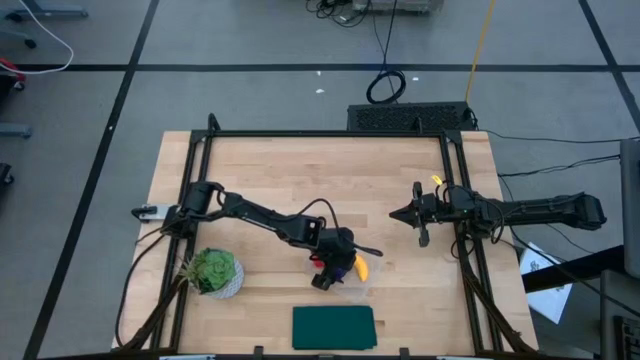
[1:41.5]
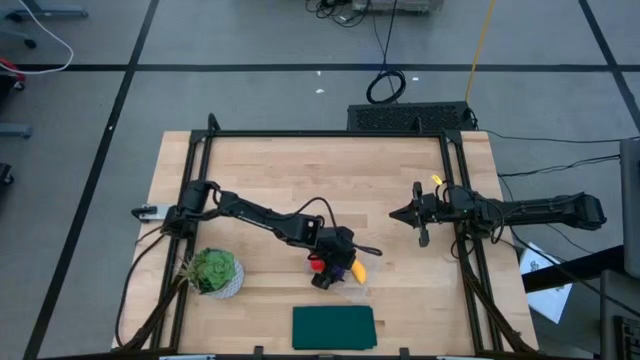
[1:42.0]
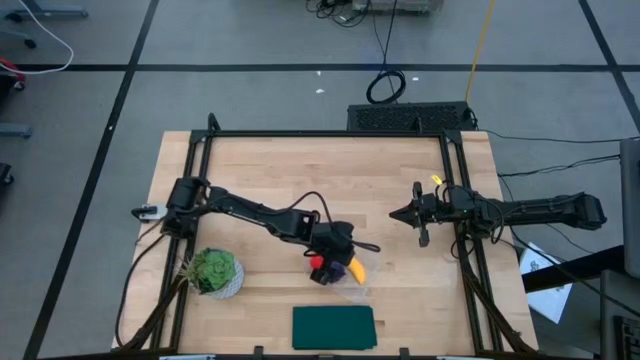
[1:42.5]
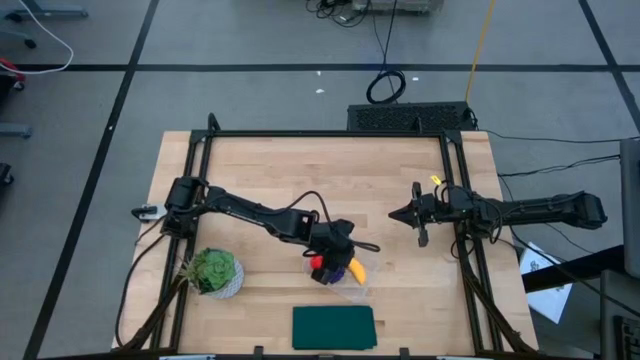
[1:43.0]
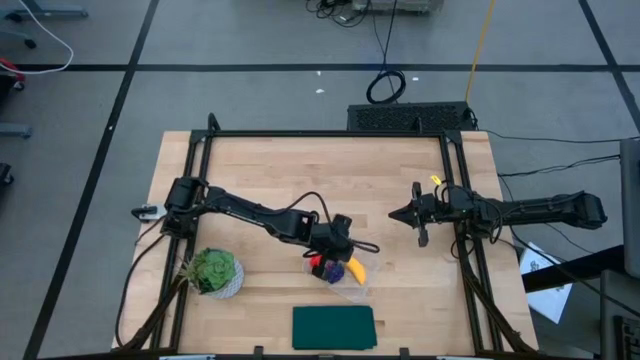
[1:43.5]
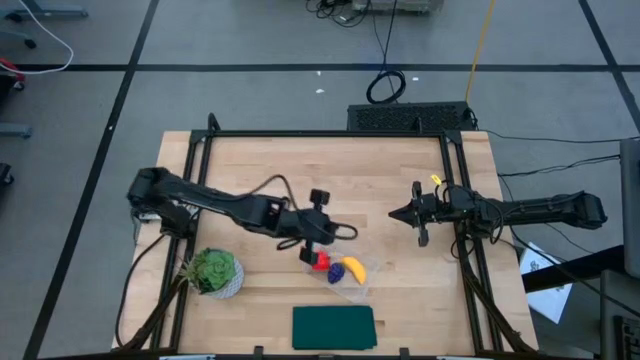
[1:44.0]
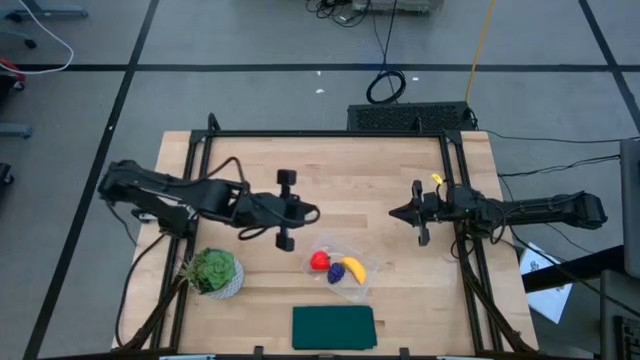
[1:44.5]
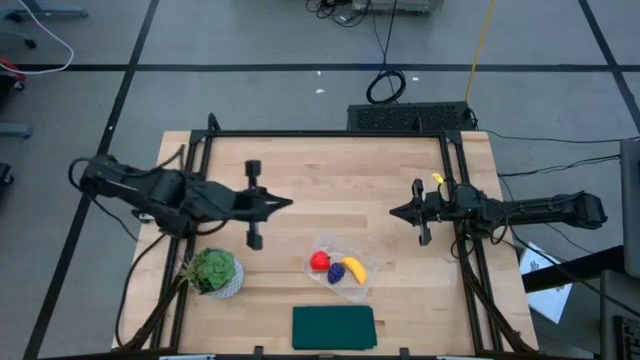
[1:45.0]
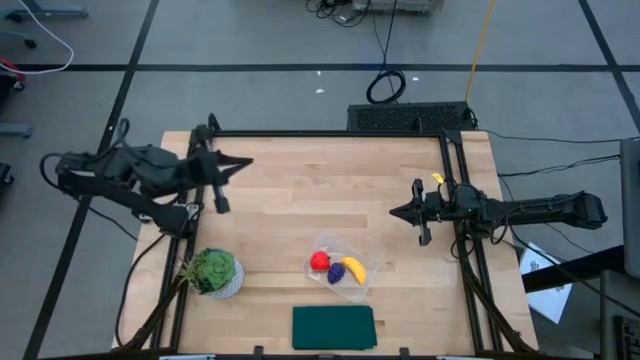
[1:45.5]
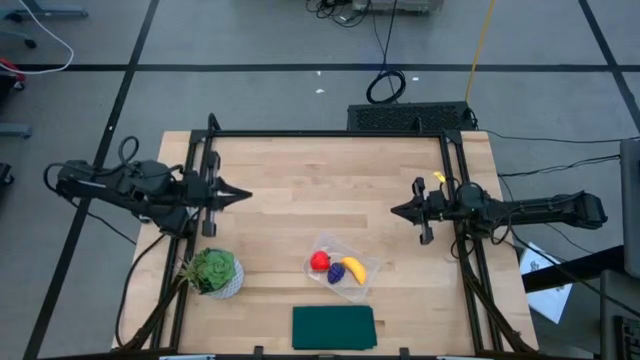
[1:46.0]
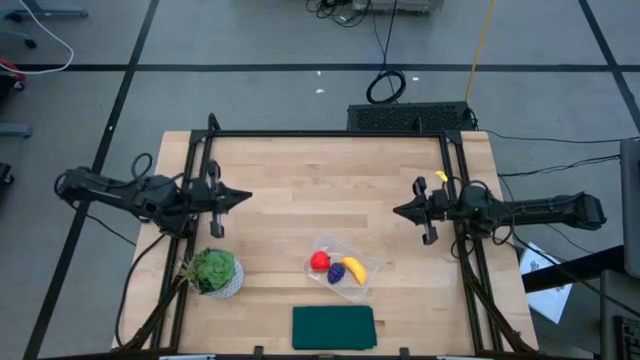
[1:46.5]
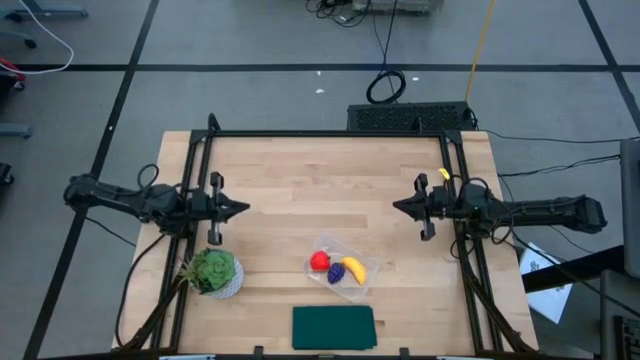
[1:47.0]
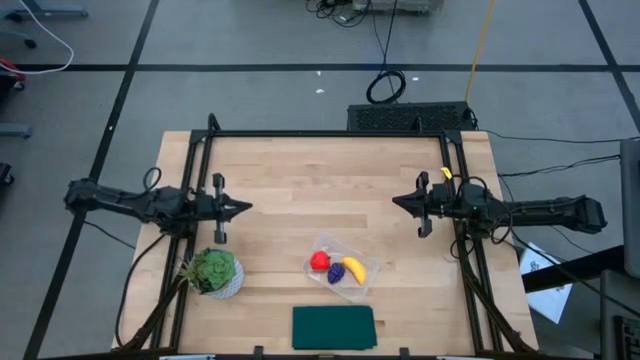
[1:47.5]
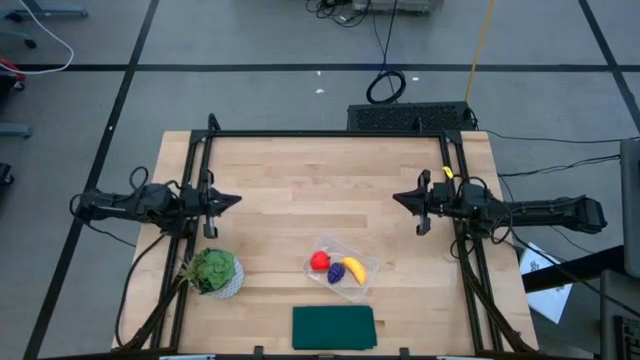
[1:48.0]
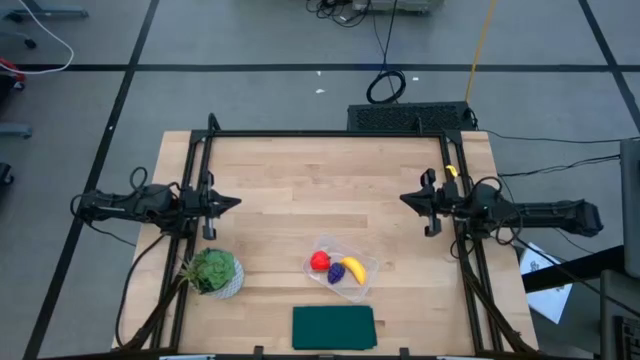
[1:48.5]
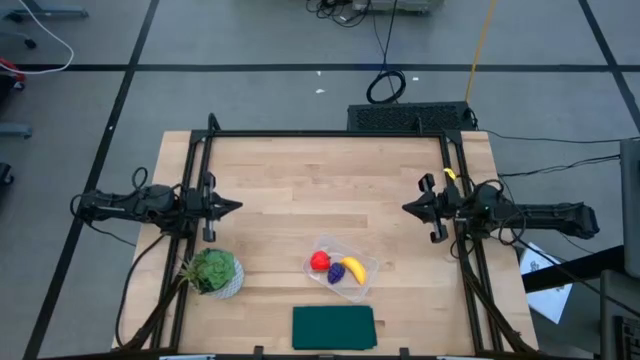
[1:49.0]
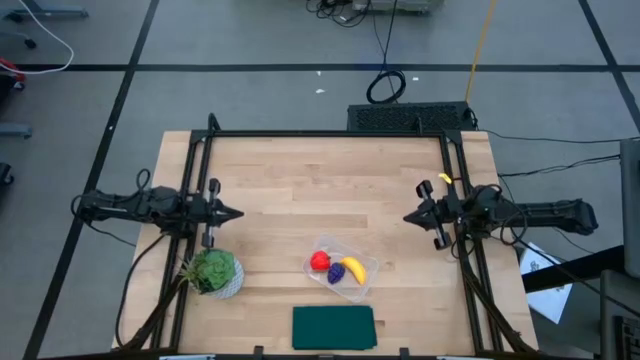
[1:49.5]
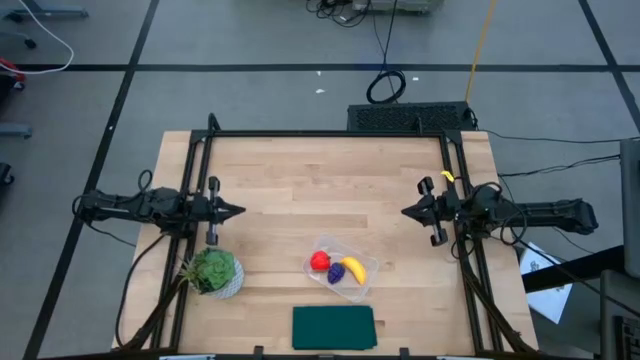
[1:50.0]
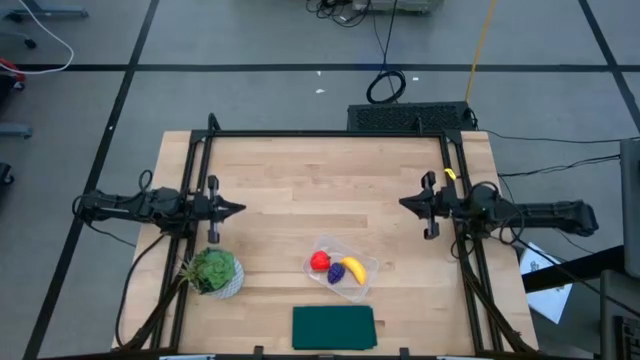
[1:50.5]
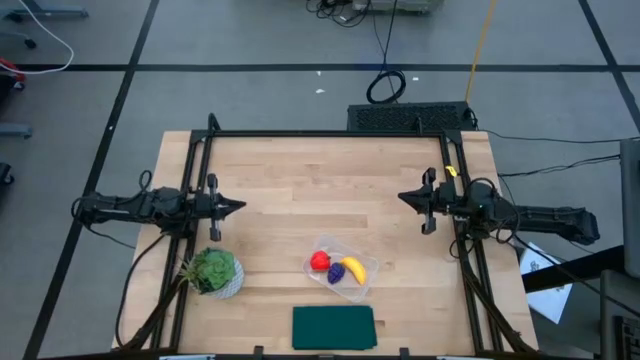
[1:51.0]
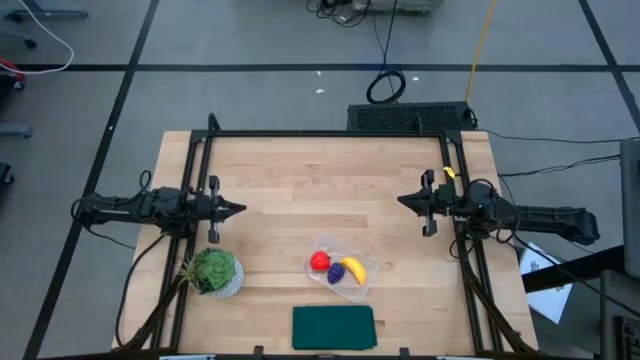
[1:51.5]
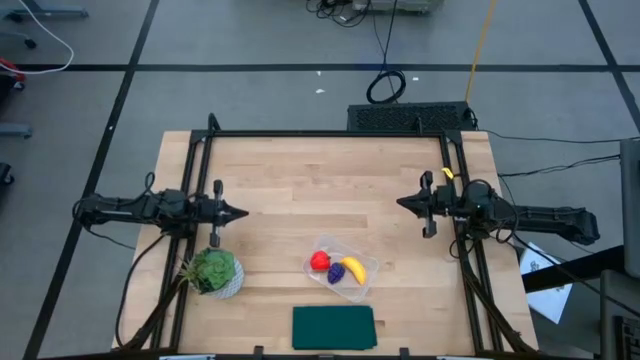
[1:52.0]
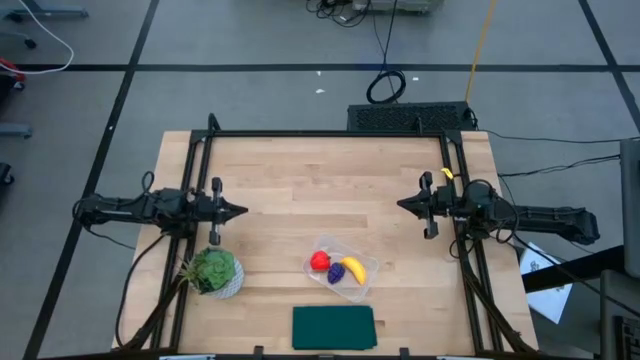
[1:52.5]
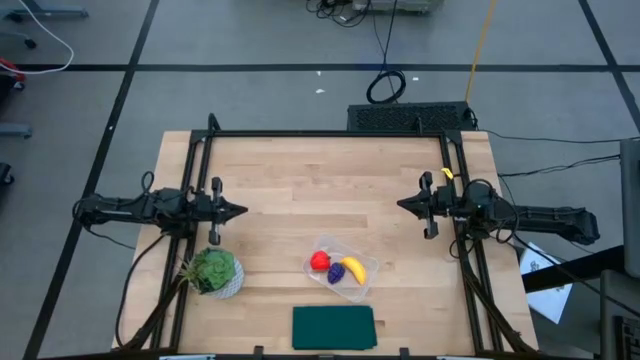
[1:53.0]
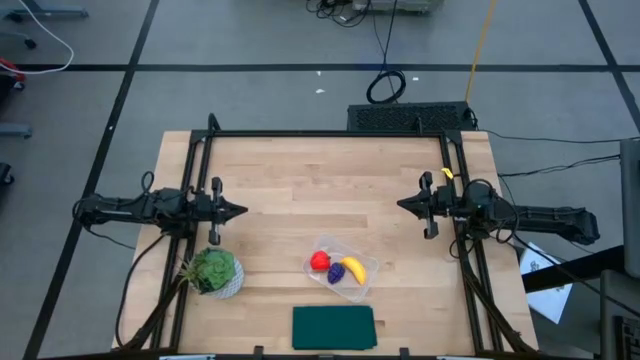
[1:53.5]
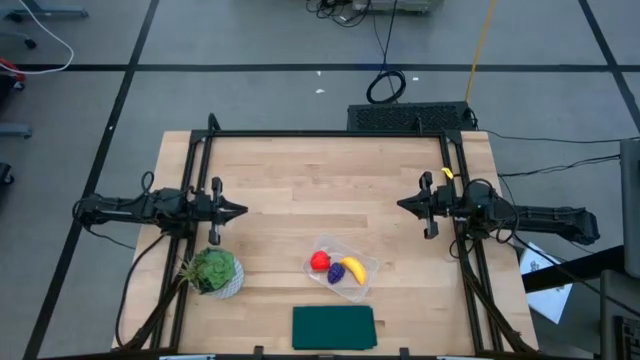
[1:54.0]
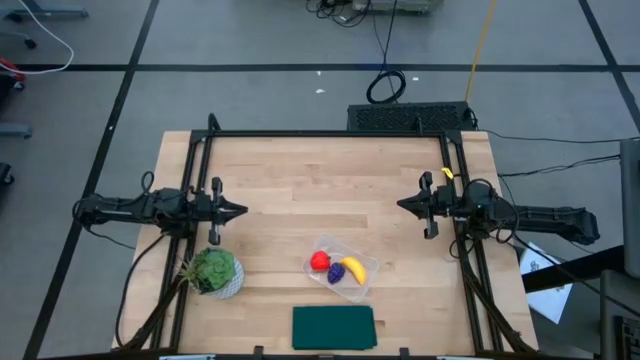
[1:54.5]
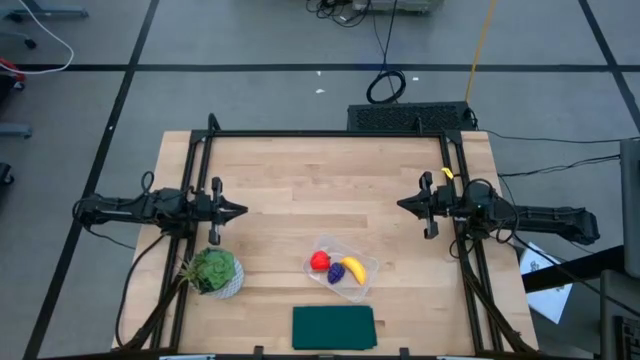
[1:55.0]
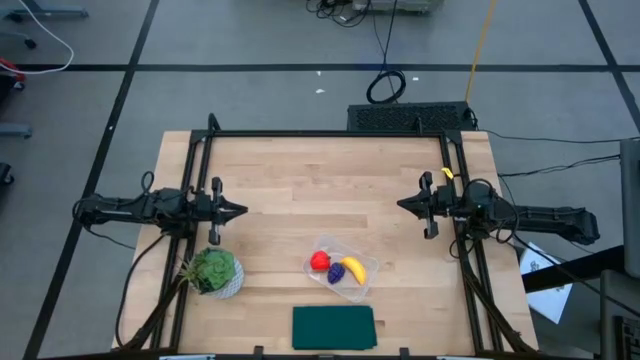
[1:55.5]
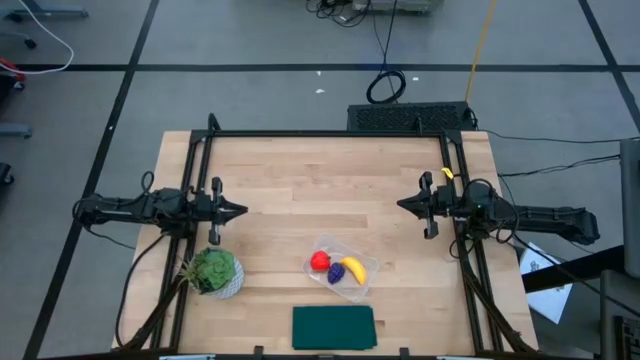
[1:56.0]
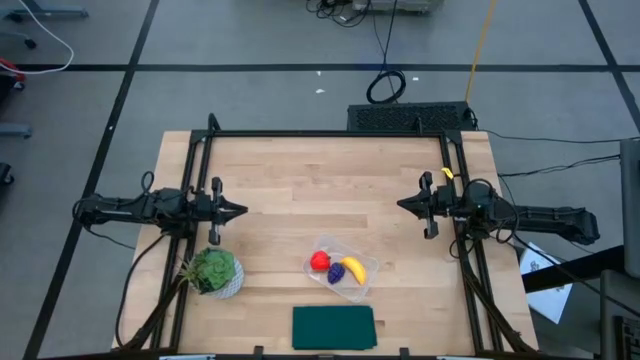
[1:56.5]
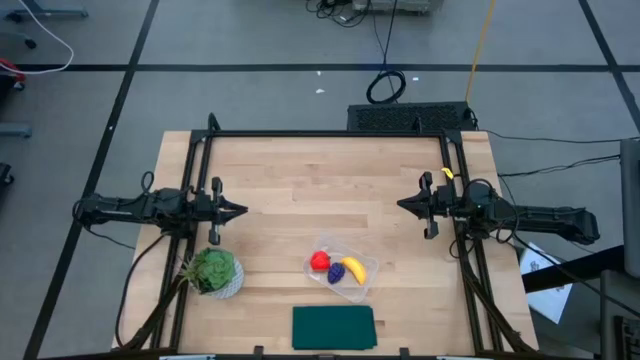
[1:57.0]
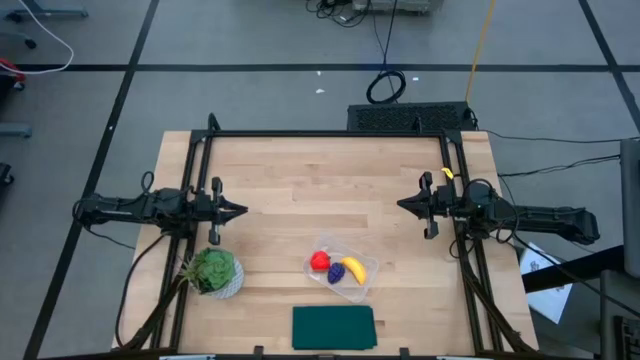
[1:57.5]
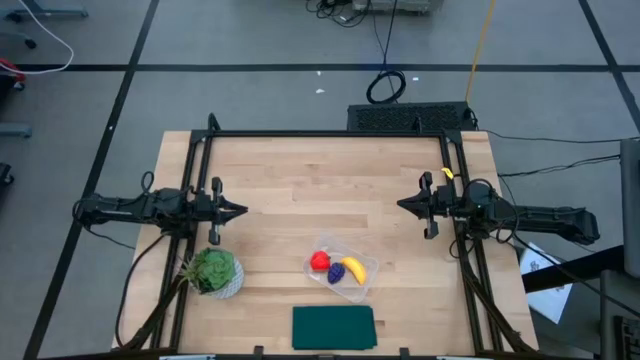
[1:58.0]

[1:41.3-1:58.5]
Task: Pick and placing Produce into tupperware
Return to Home Position

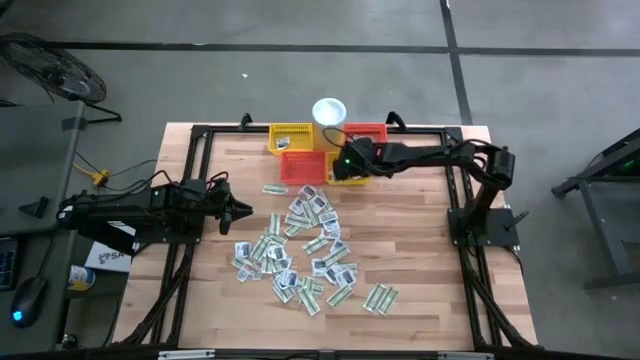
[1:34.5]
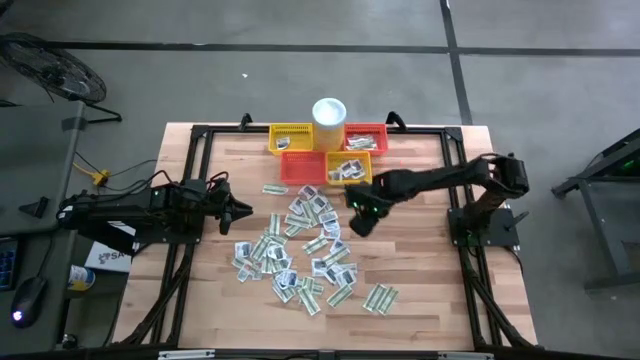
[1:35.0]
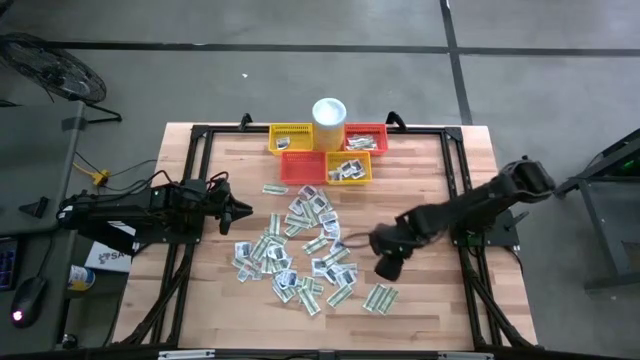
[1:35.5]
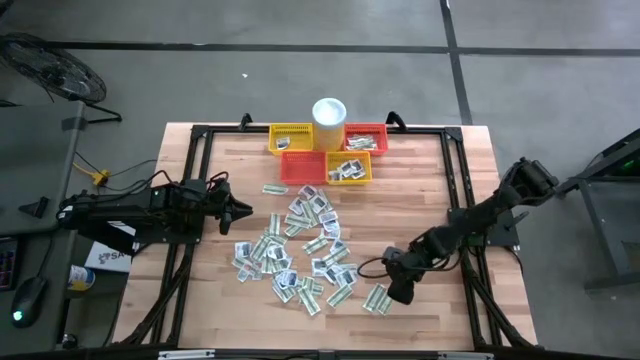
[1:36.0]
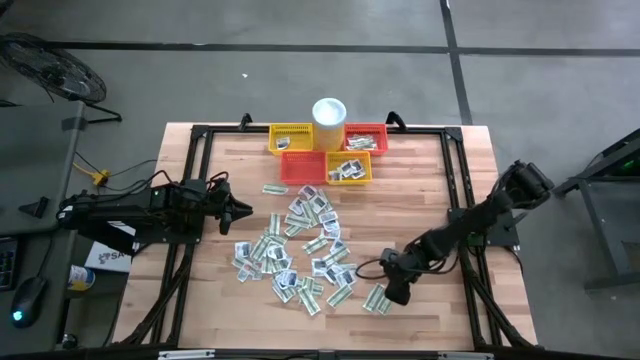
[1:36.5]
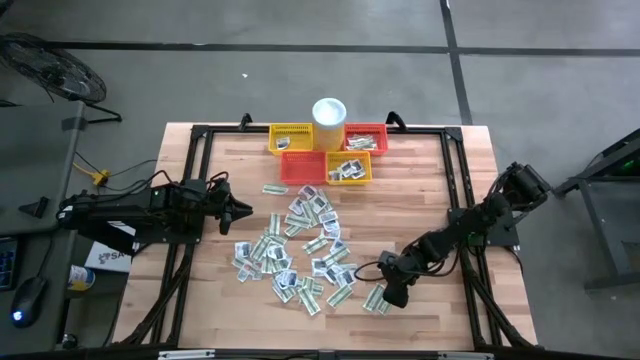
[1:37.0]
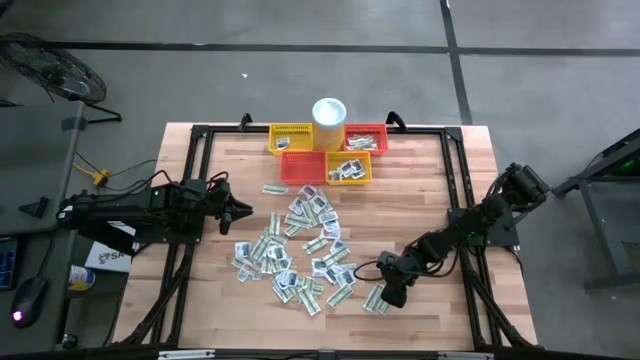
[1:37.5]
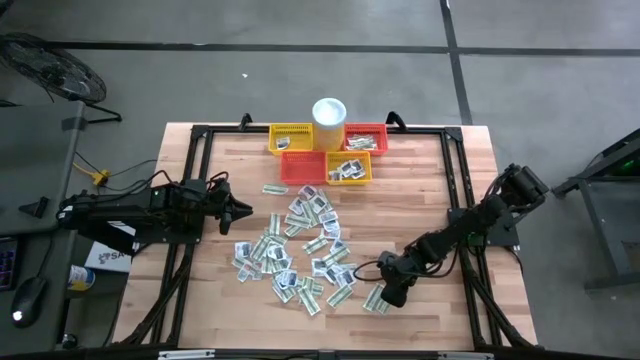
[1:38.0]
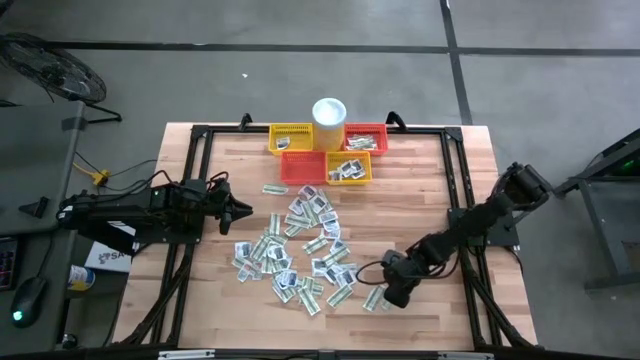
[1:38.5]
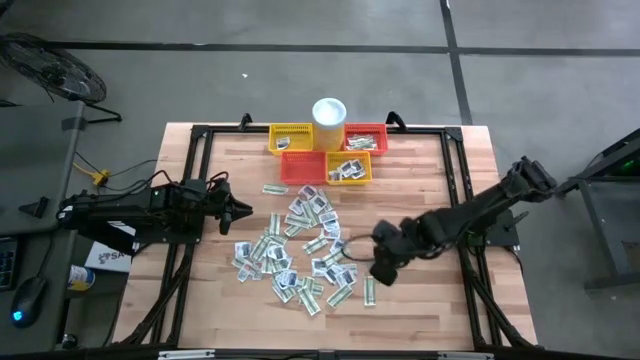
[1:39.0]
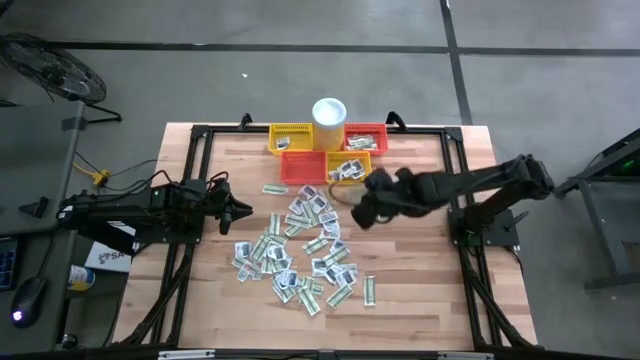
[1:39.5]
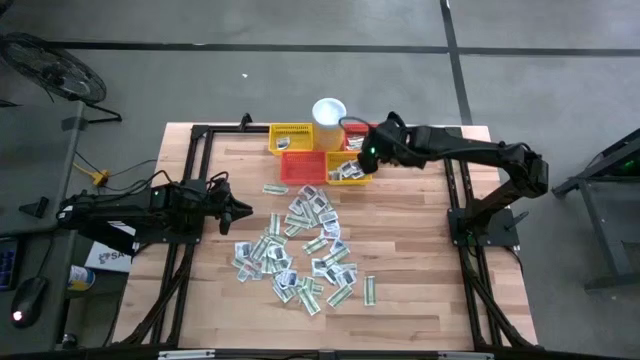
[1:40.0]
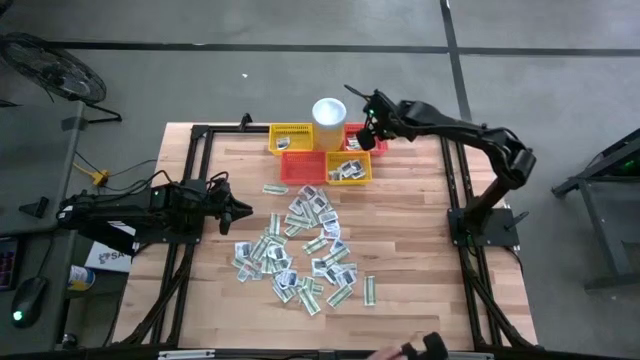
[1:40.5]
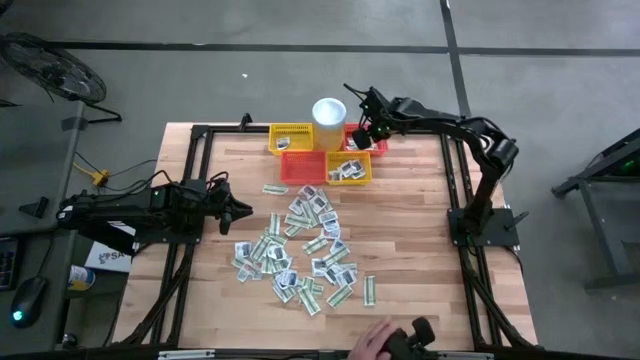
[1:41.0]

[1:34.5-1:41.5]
Task: Pick & Place First Aid Supplies
Put the green bandage pack into the top orange basket
